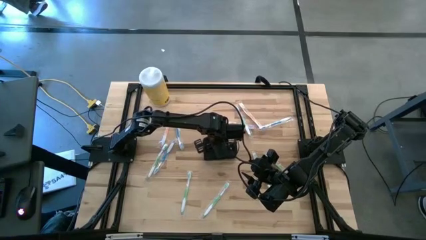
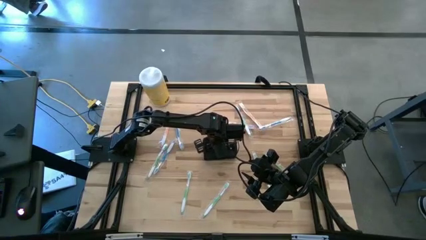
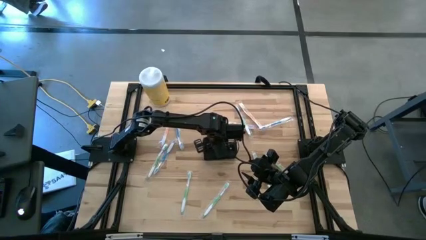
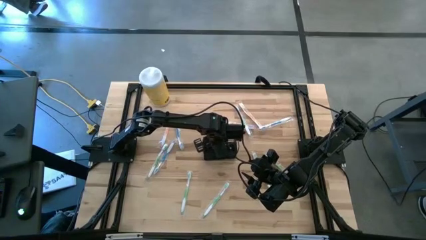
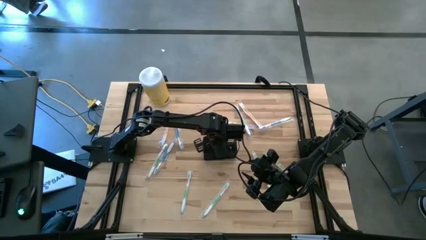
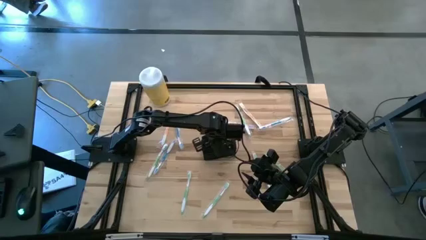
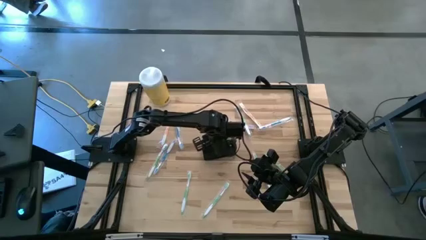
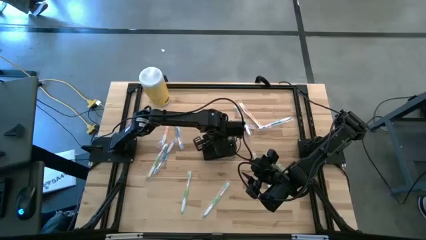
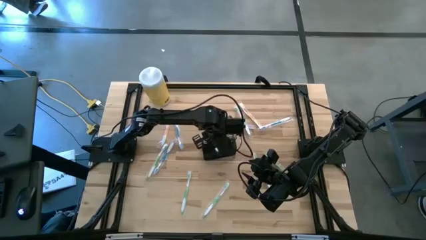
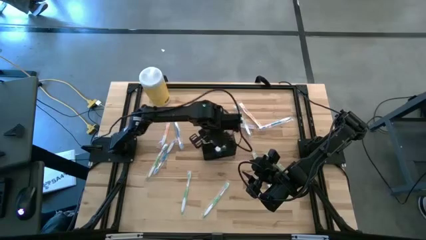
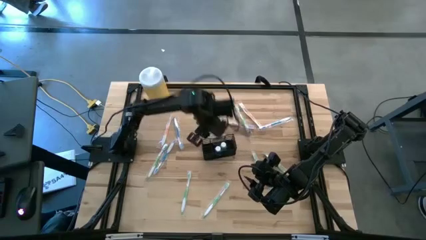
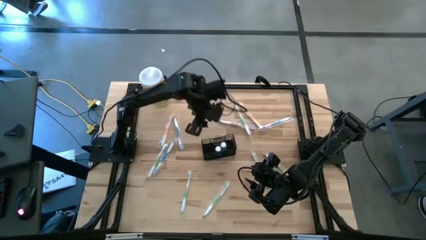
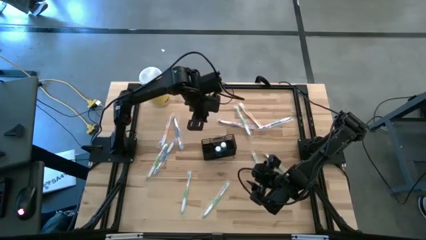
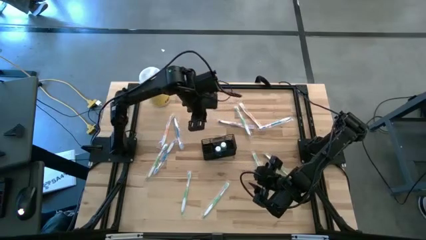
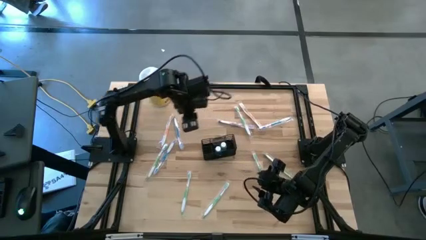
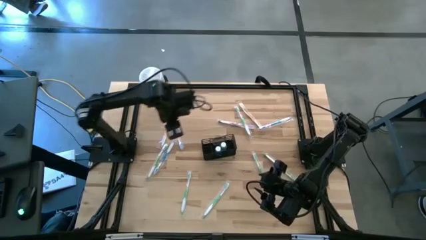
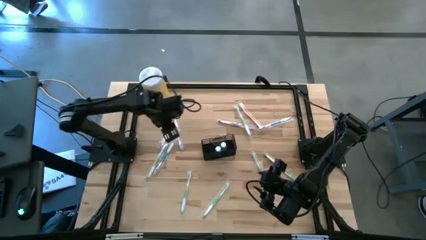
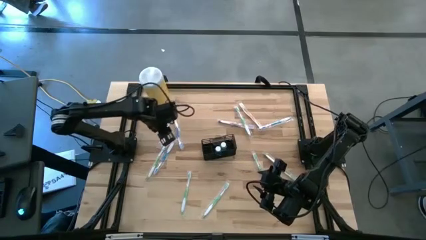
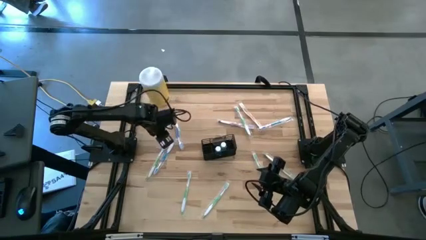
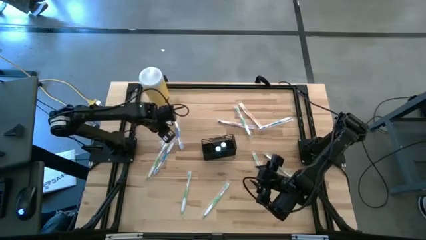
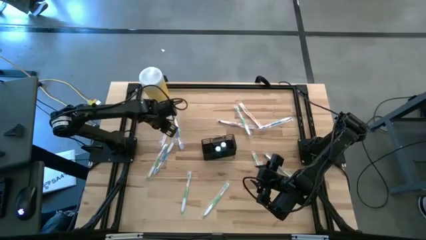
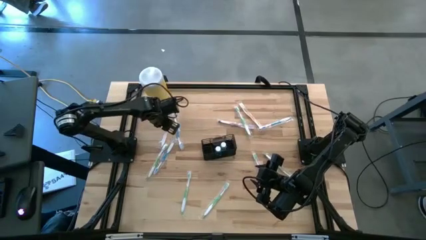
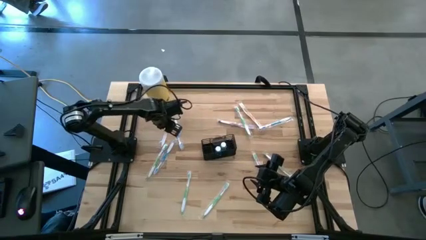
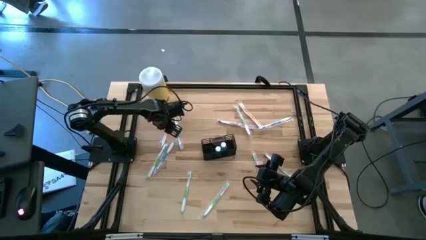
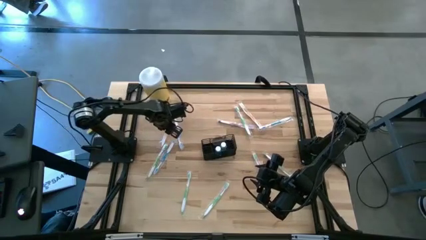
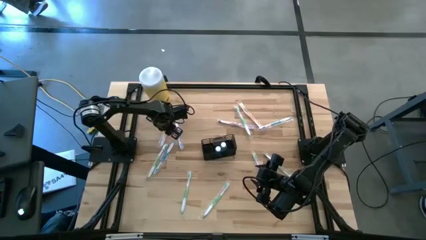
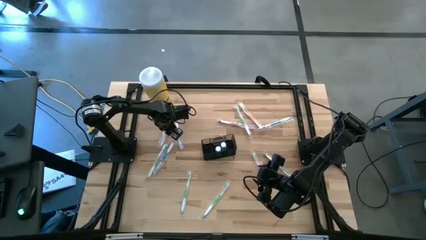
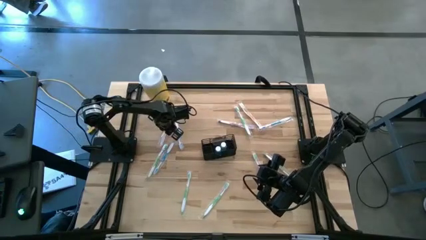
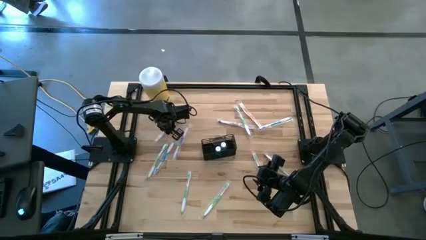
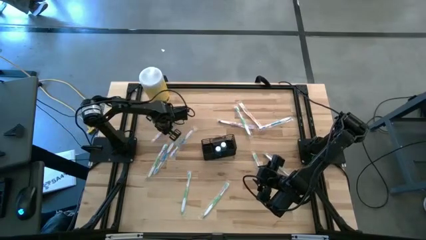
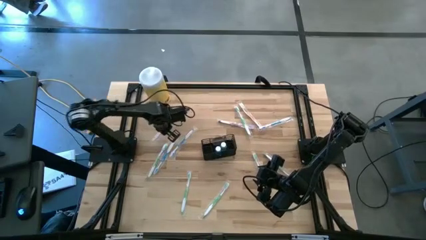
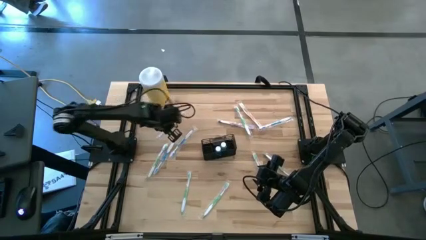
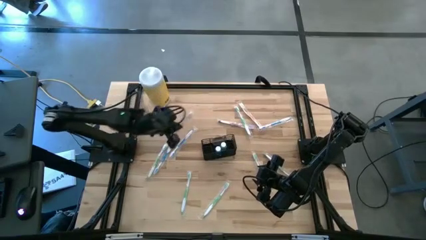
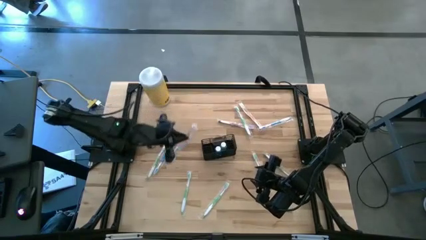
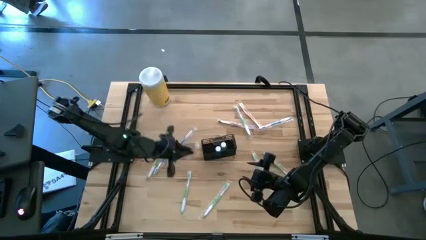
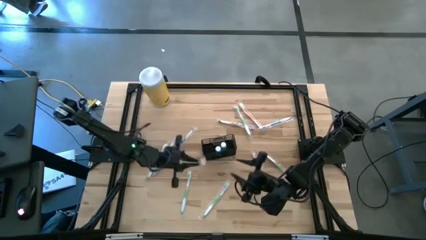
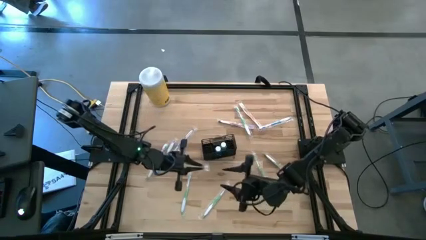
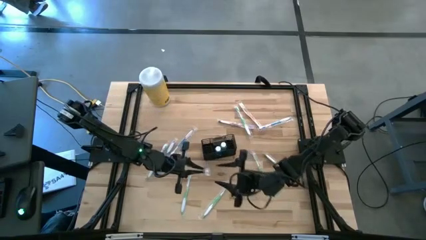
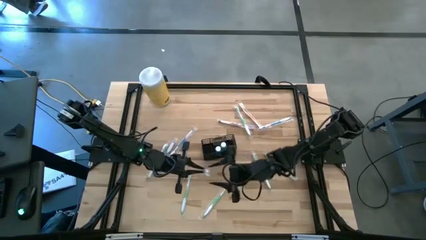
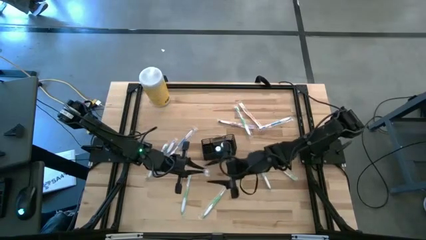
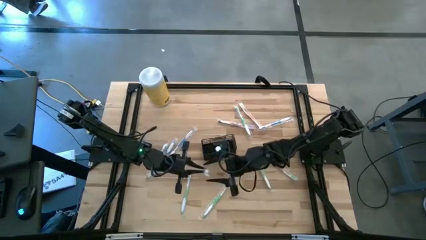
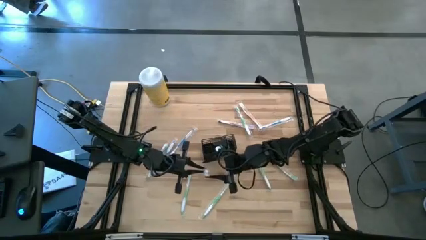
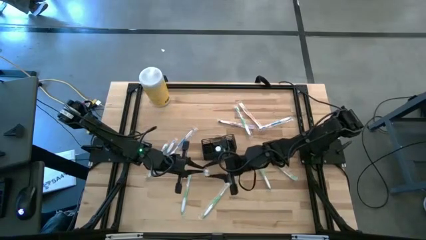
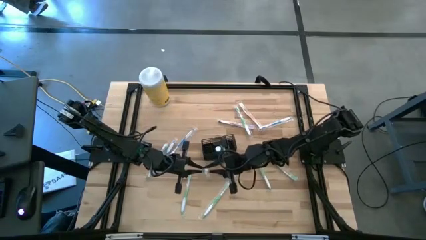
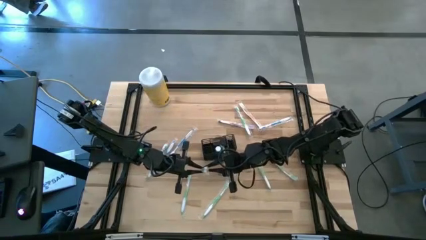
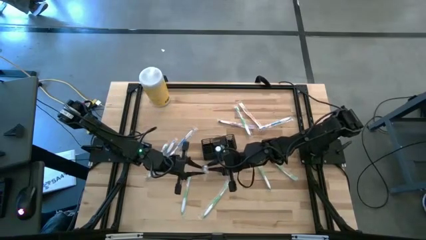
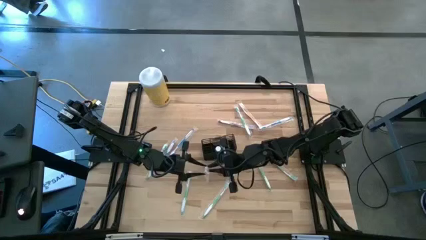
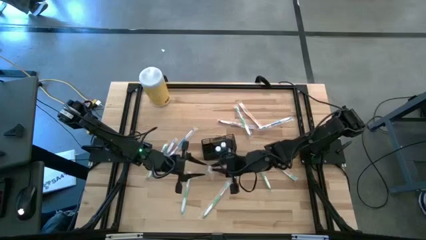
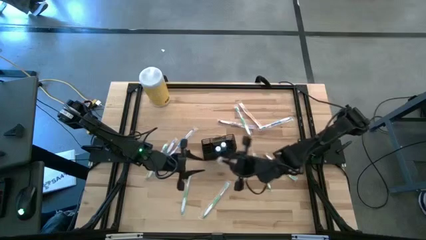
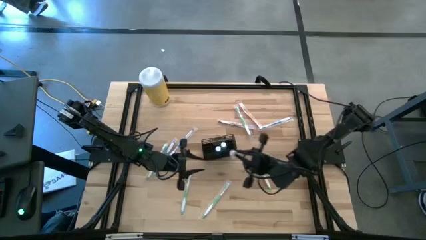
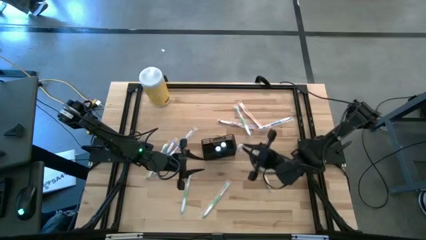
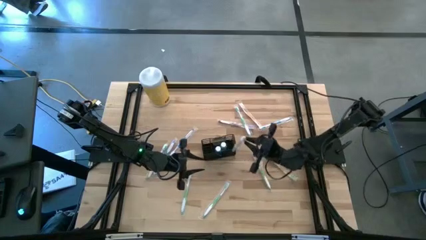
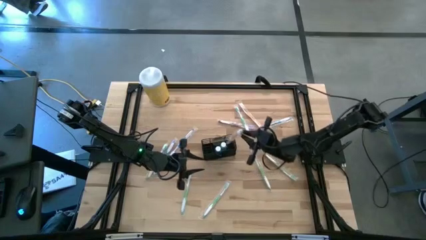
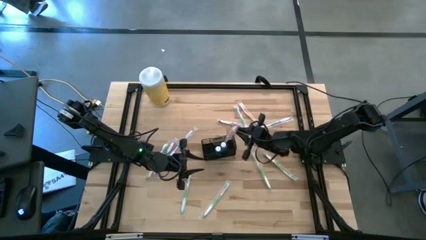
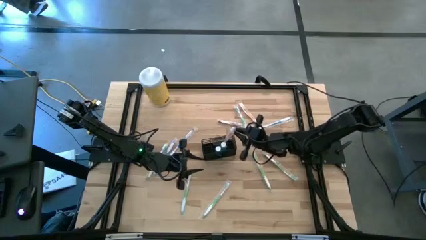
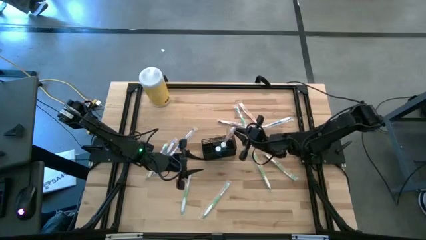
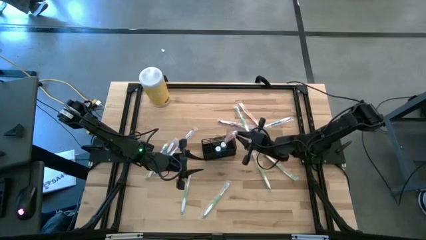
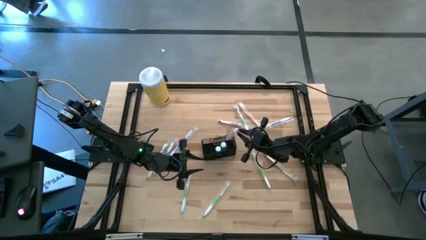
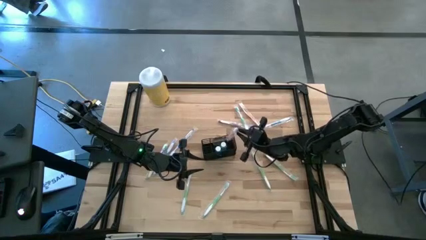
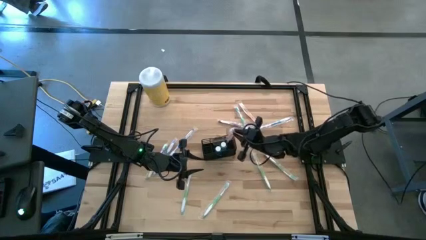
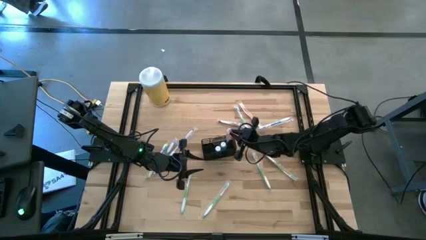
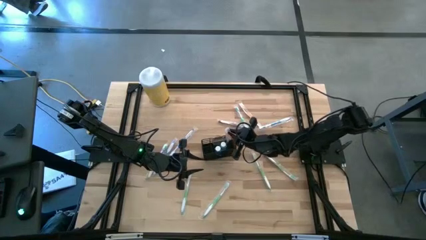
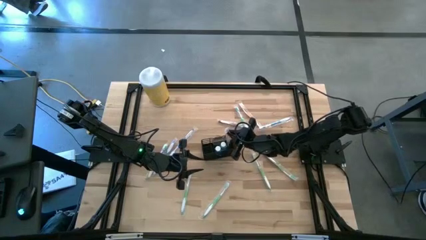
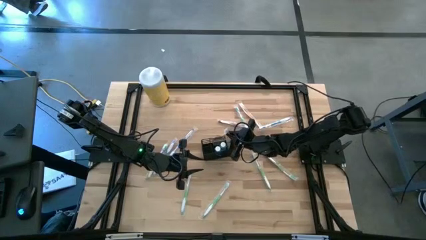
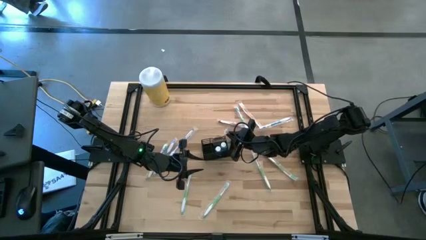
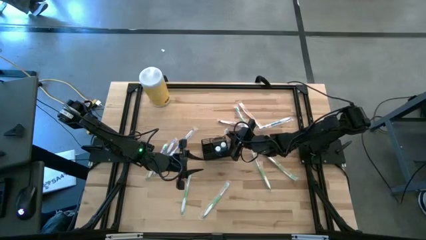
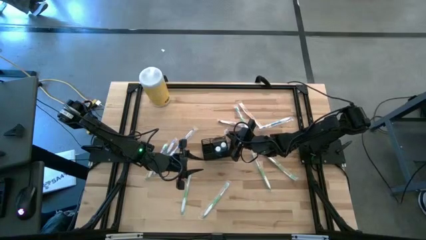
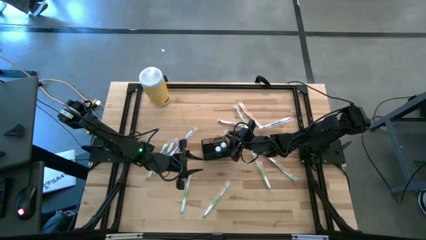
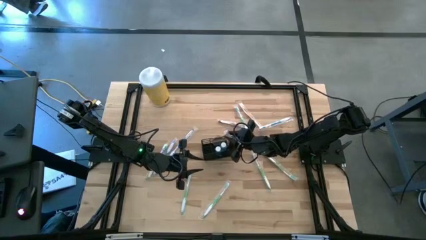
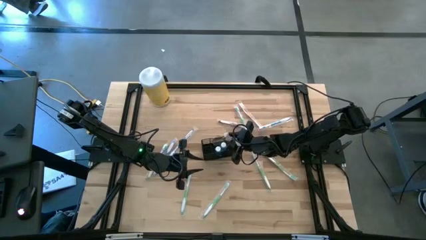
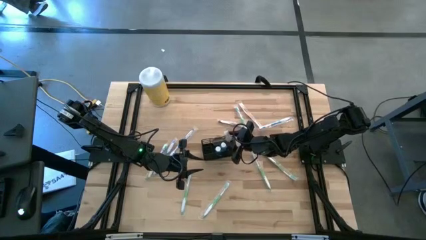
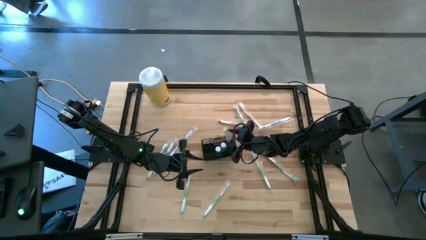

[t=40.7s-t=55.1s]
Task: Pick & Place toothbrushing station
Put the orange toothbrush into the wire organizer
